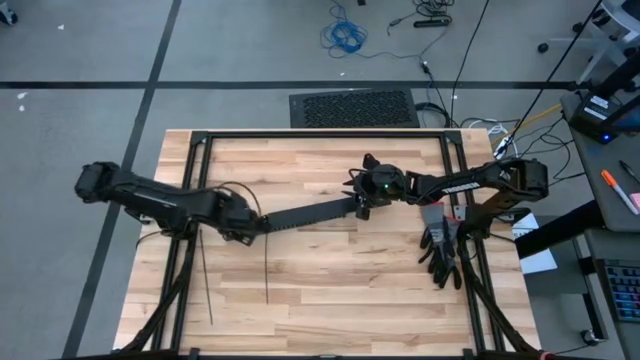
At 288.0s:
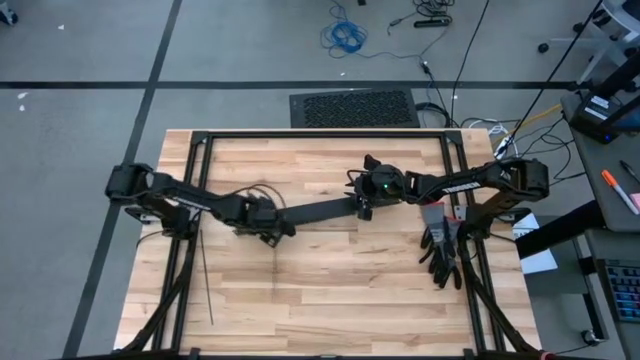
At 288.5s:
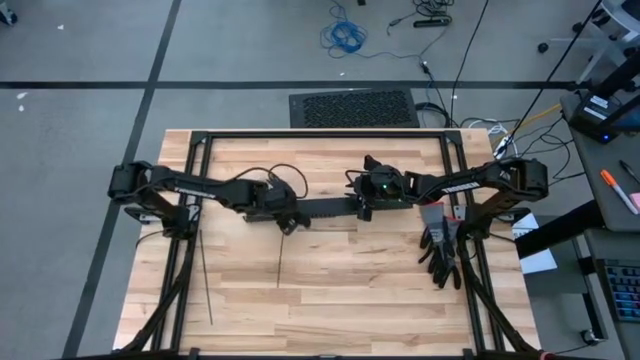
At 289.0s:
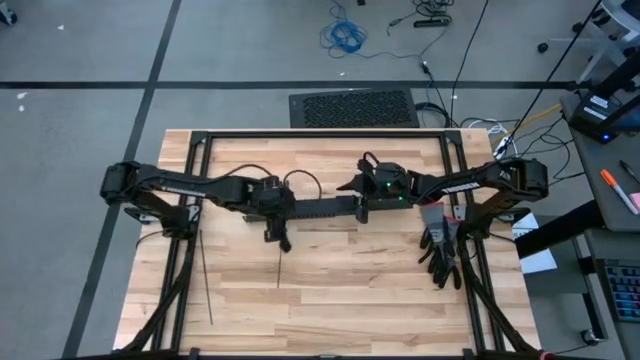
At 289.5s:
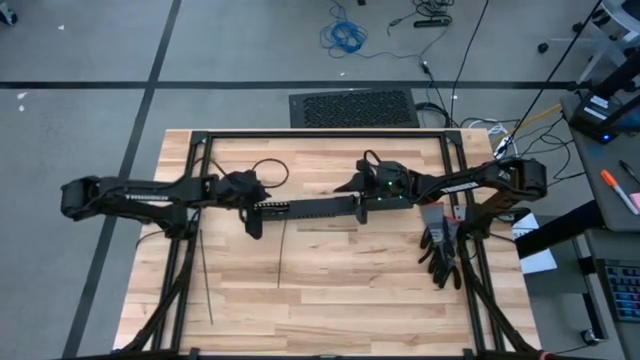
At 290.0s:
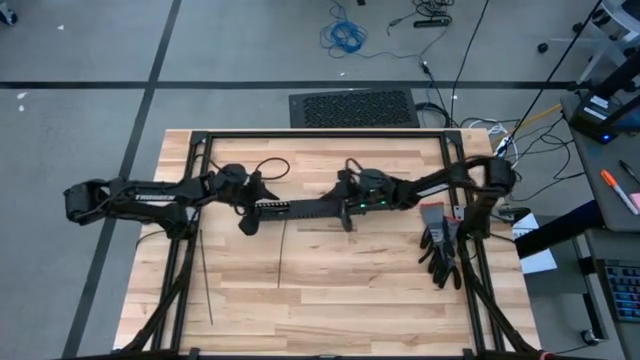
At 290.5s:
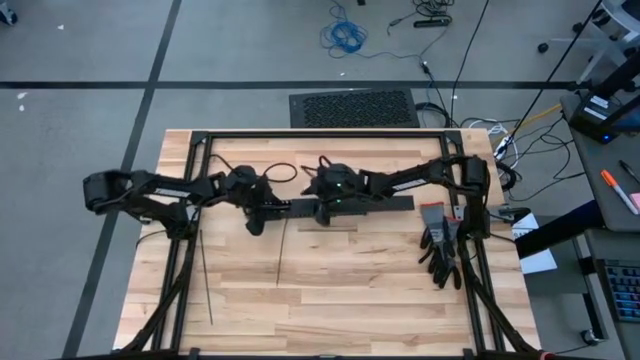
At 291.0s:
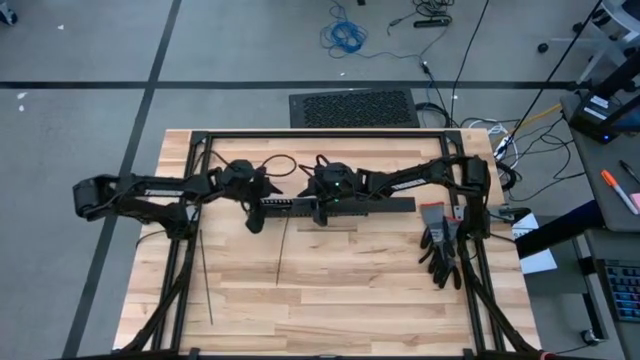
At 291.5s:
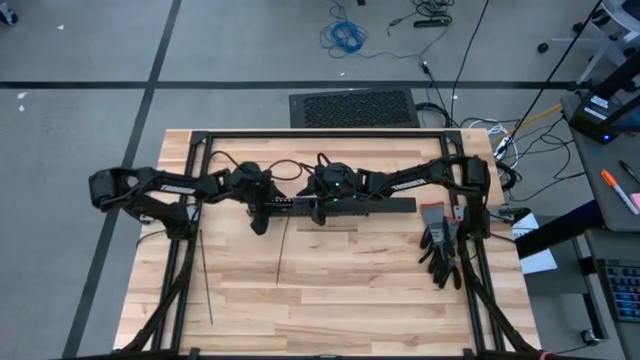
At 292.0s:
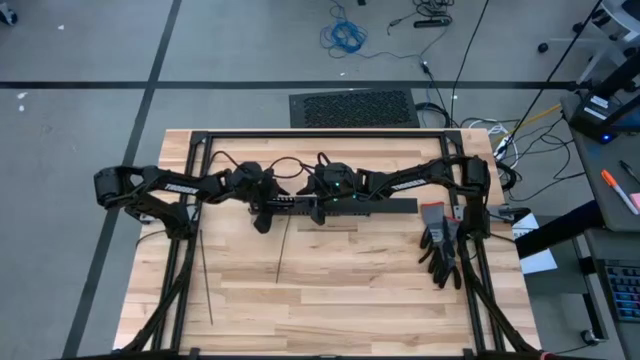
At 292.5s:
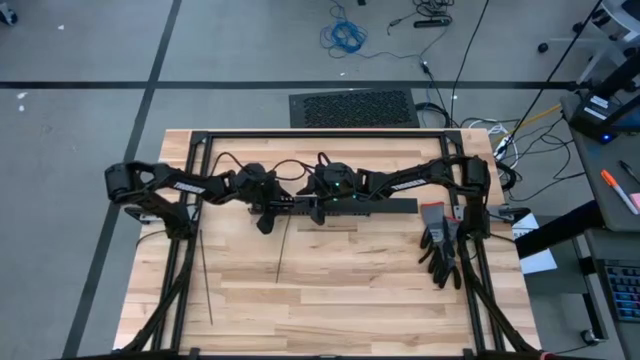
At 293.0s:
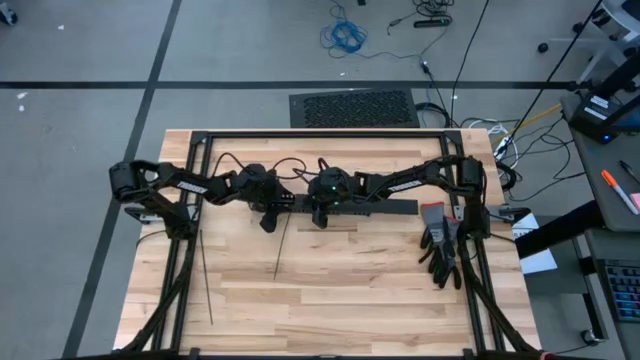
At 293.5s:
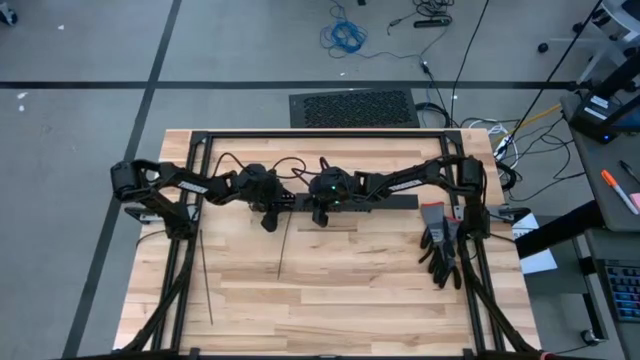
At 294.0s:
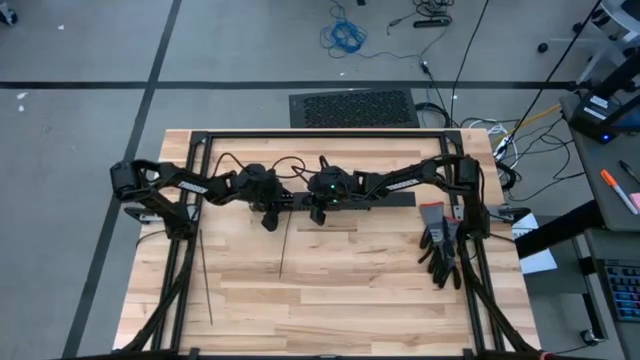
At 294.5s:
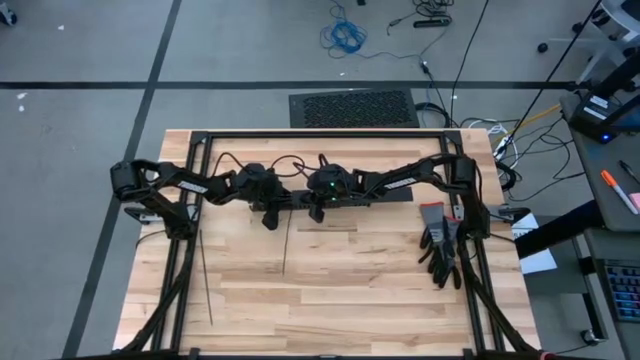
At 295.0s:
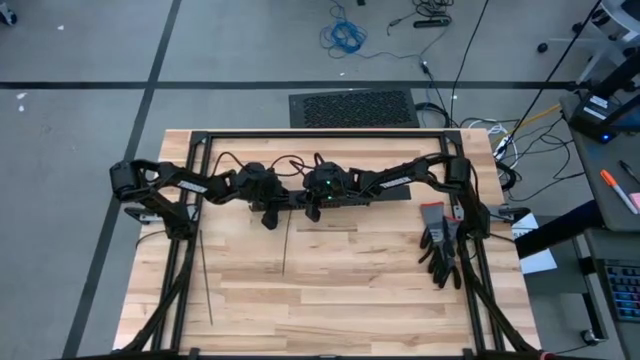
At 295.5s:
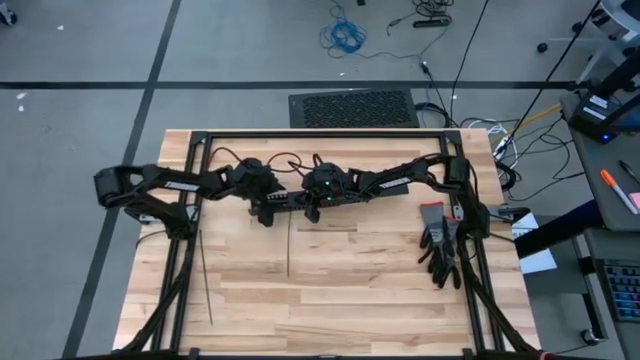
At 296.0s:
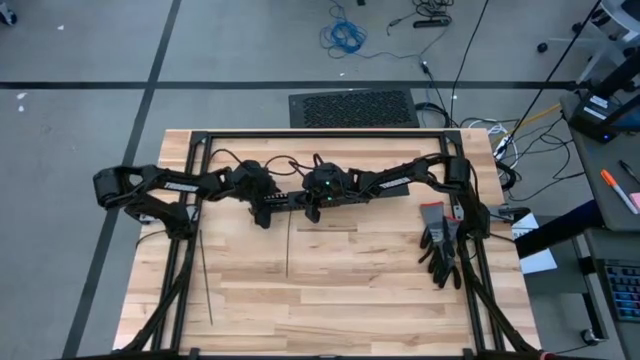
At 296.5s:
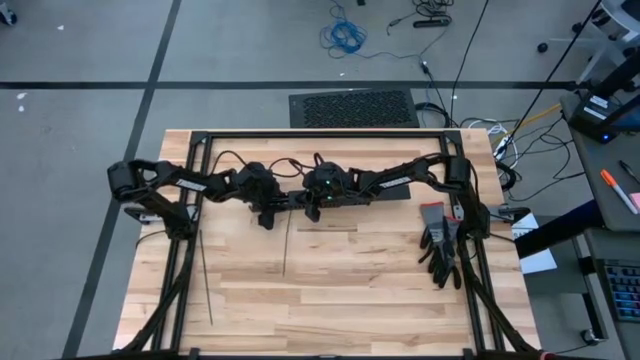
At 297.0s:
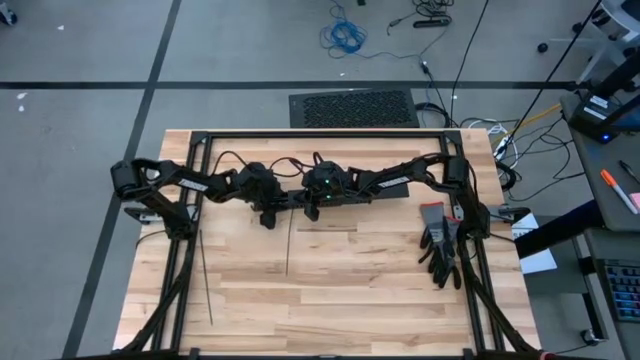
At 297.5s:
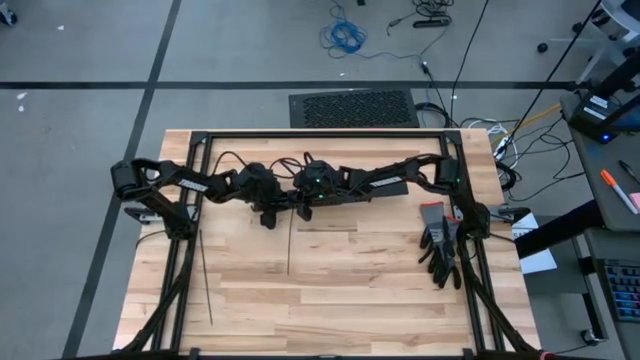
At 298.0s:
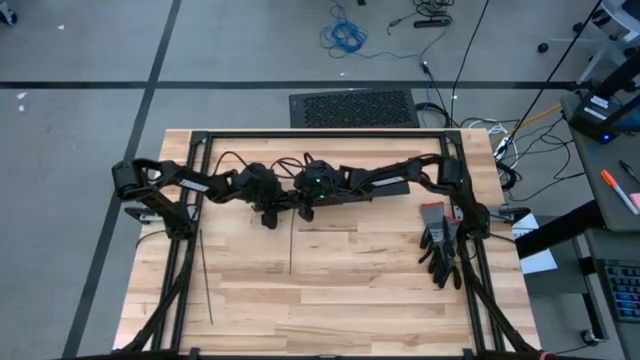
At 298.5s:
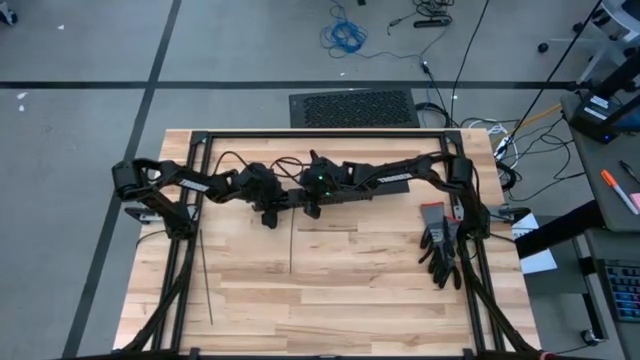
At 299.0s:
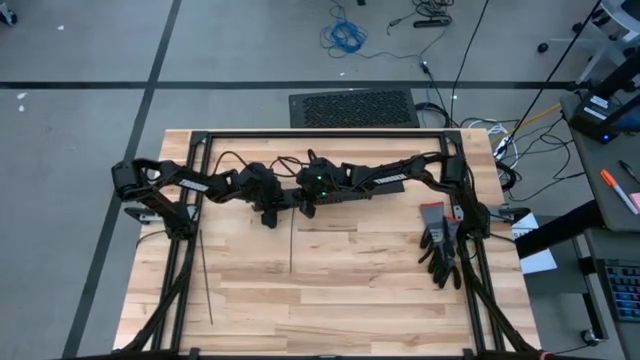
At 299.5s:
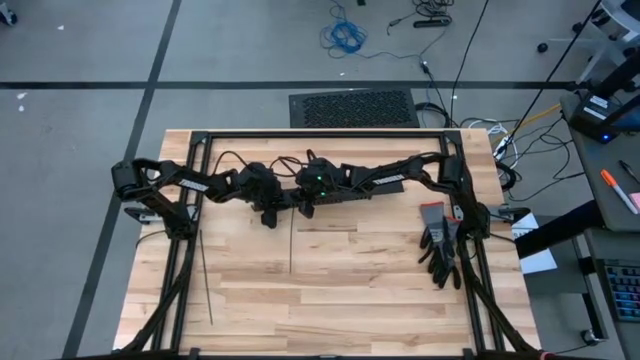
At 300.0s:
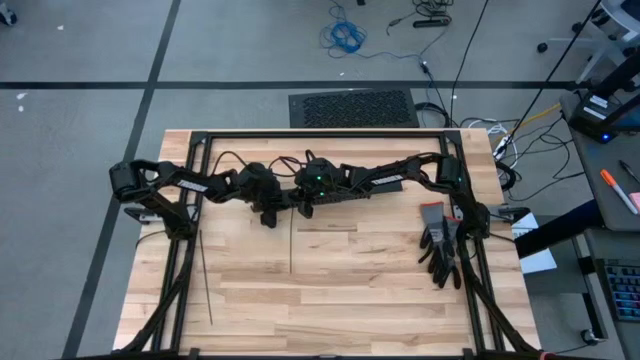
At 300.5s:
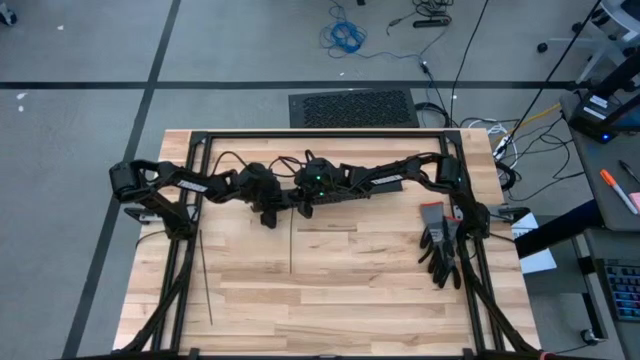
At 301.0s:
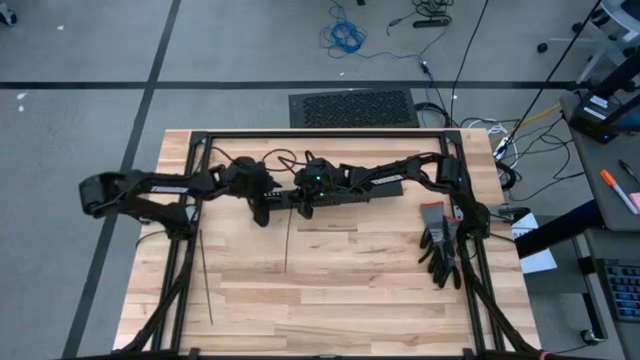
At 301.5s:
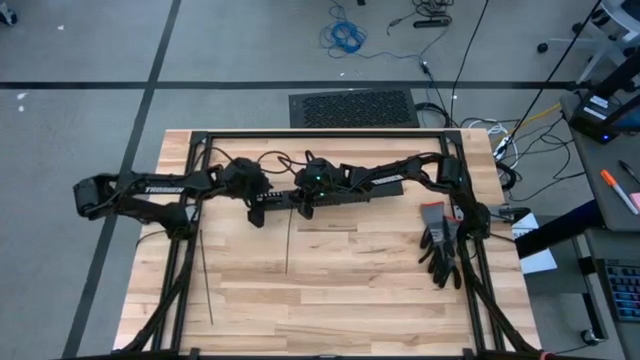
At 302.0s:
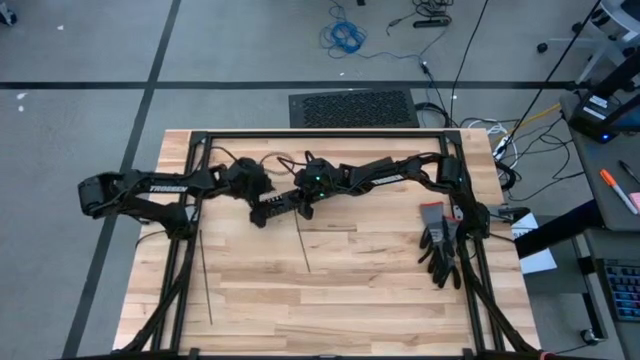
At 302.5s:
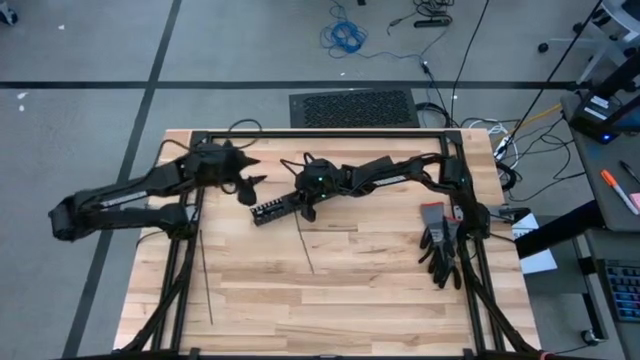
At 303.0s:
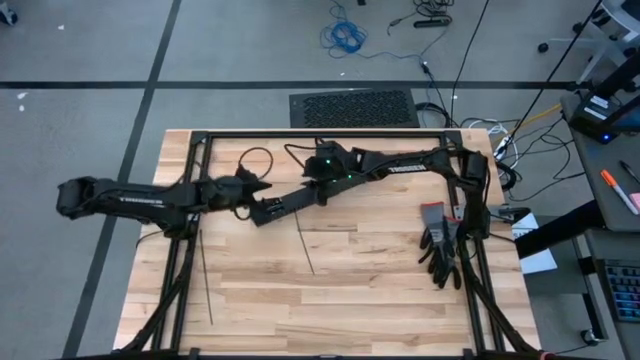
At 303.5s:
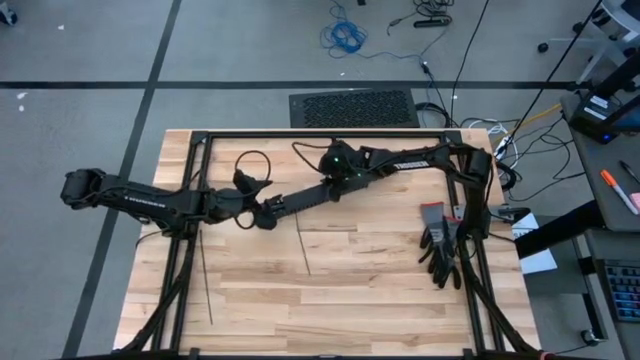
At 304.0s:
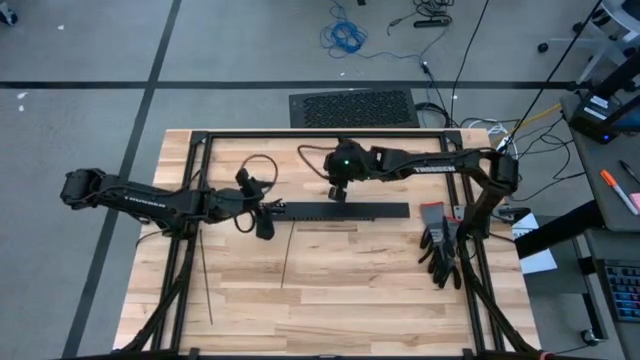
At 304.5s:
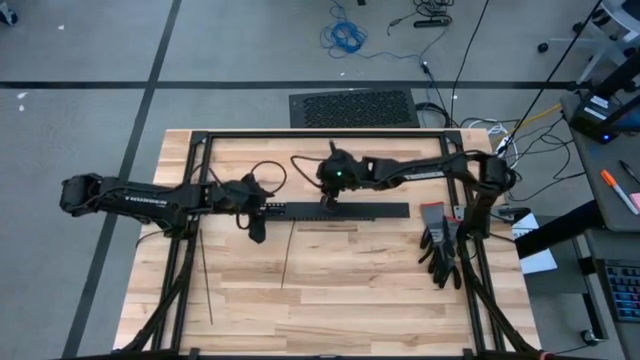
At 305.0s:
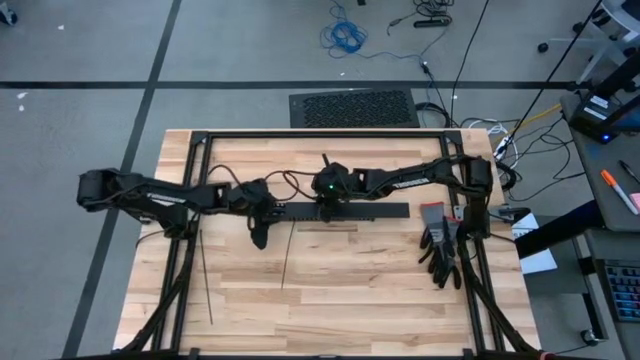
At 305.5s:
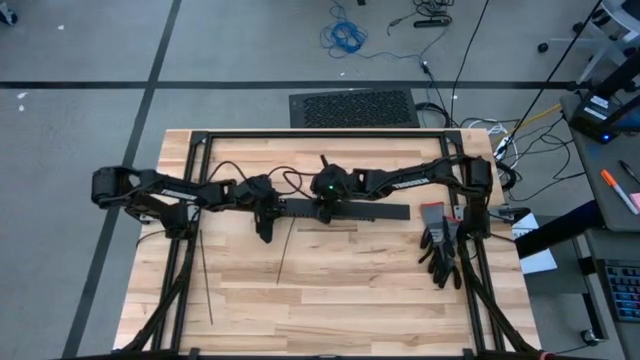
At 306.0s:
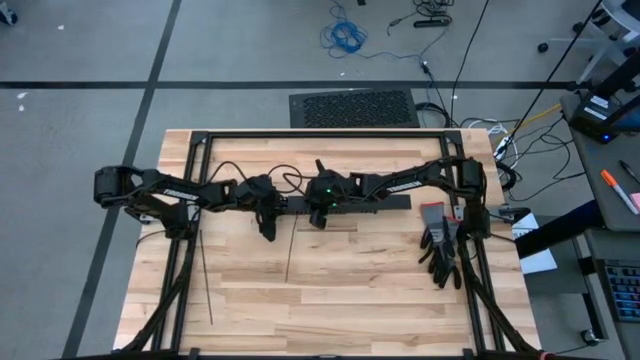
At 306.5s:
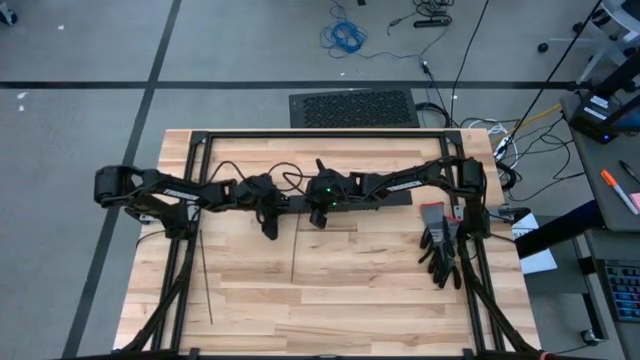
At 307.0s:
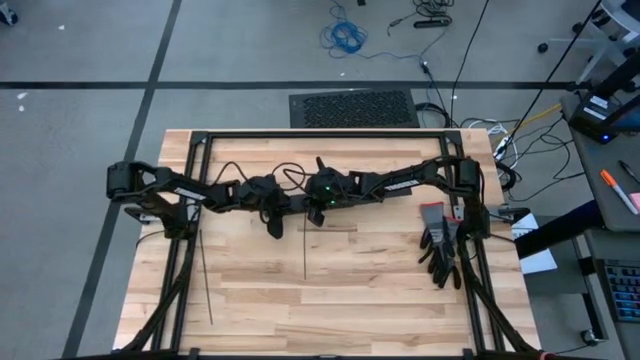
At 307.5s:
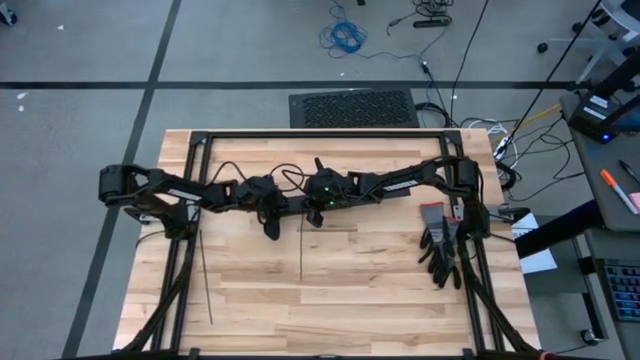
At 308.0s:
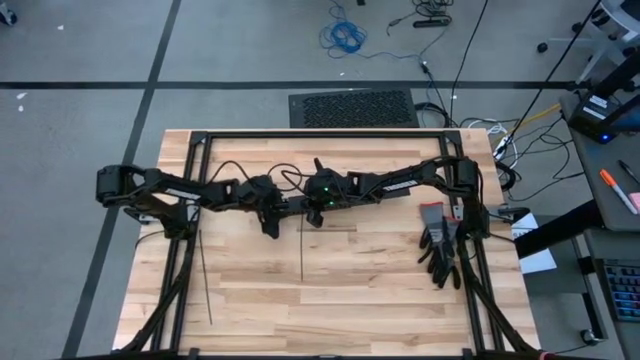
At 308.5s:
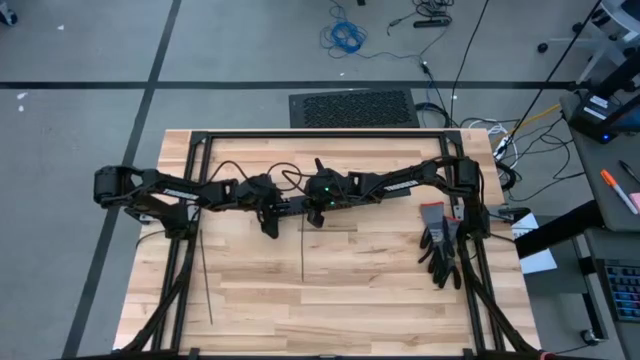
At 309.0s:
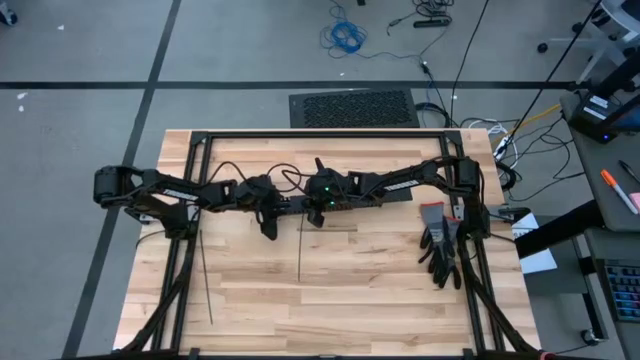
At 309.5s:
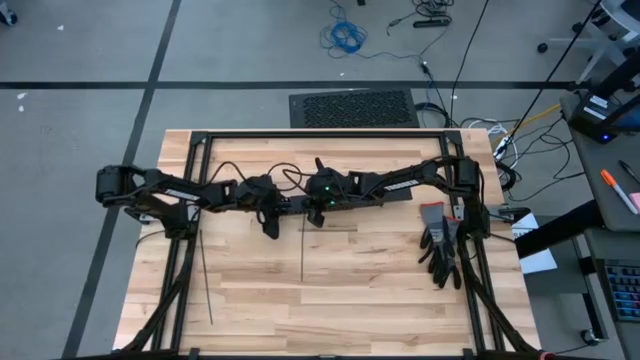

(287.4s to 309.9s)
Task: Ziptie cables
Close the black cable duct with the cable duct cover
